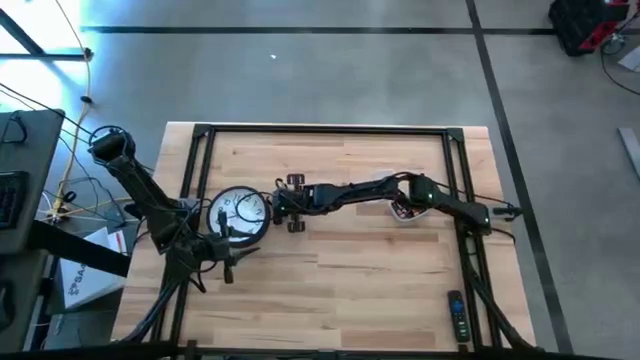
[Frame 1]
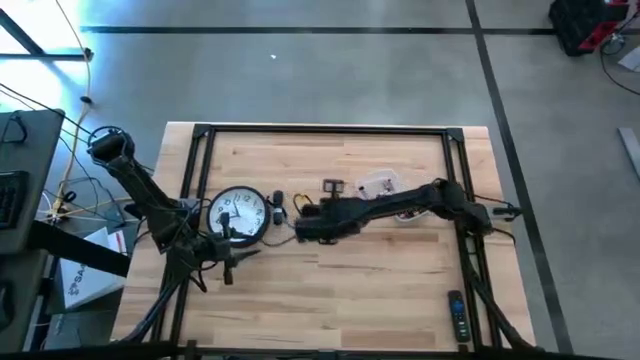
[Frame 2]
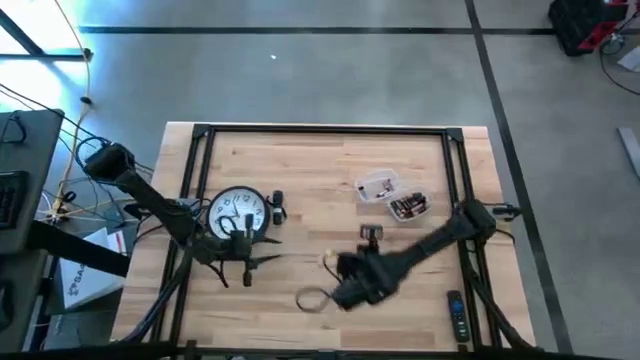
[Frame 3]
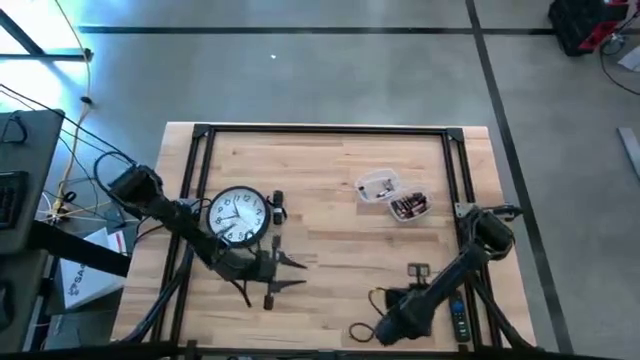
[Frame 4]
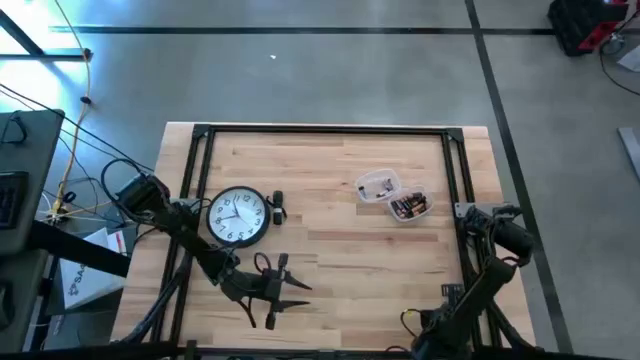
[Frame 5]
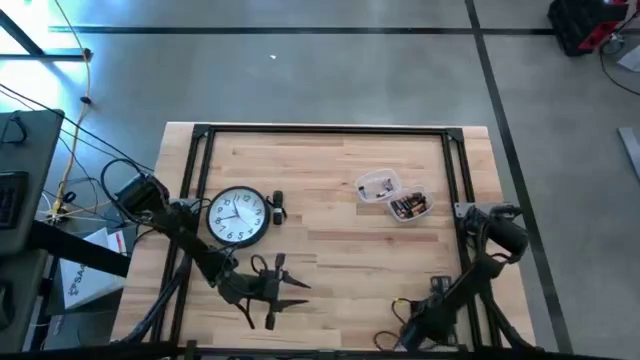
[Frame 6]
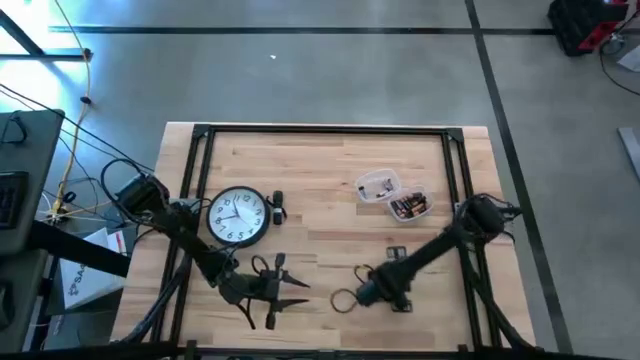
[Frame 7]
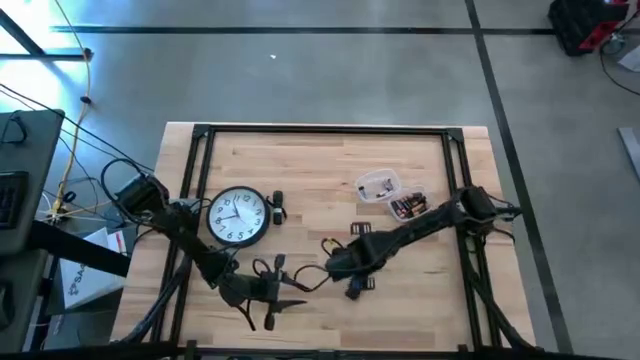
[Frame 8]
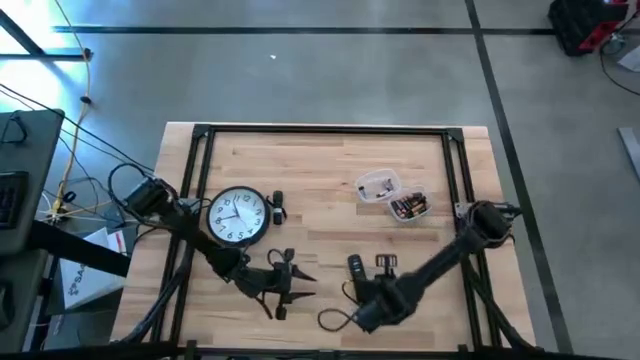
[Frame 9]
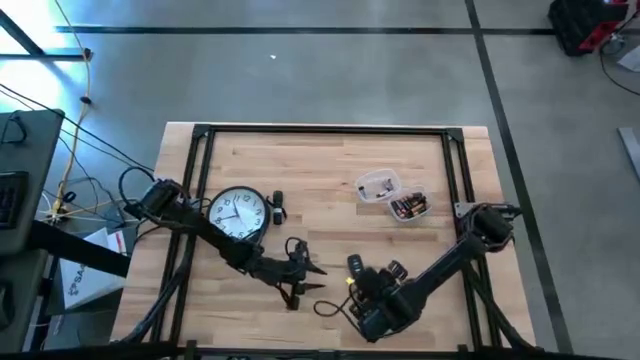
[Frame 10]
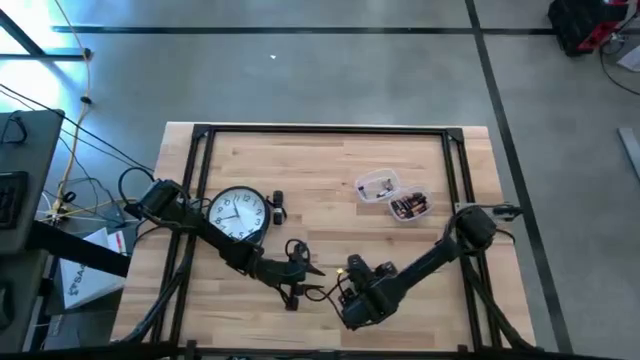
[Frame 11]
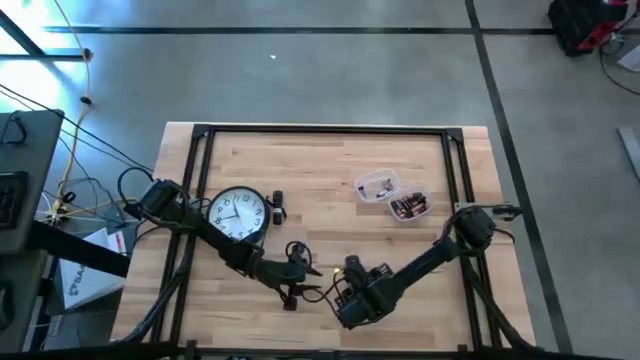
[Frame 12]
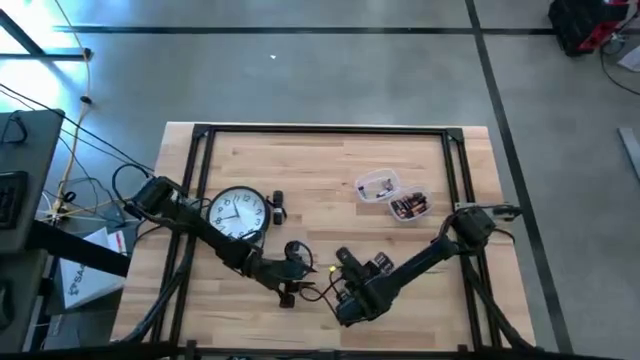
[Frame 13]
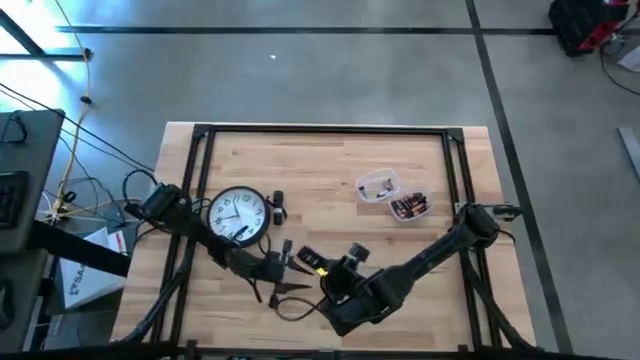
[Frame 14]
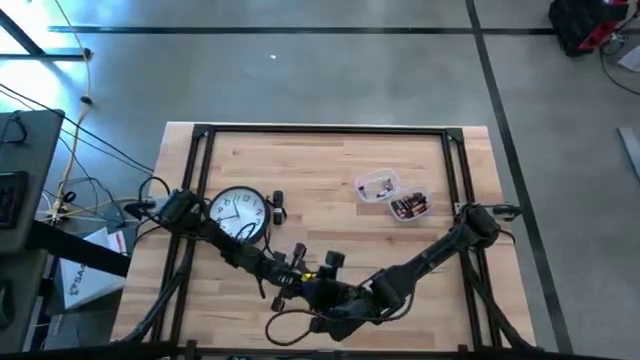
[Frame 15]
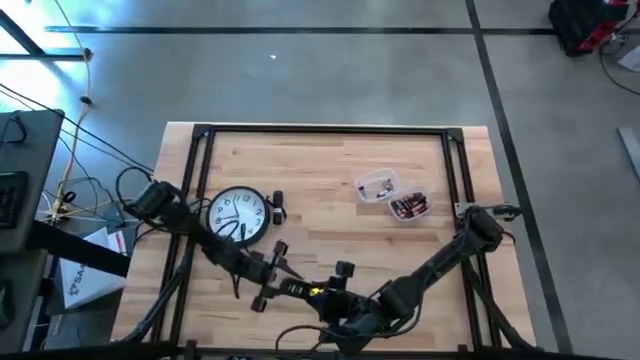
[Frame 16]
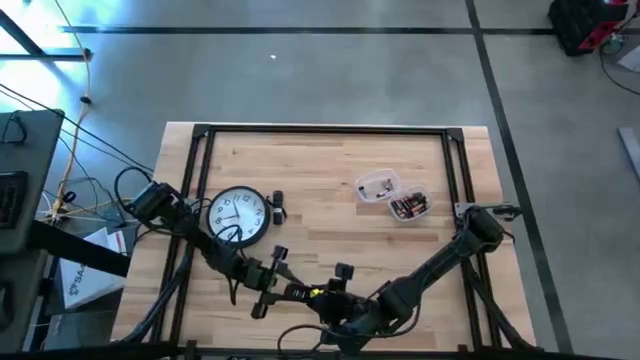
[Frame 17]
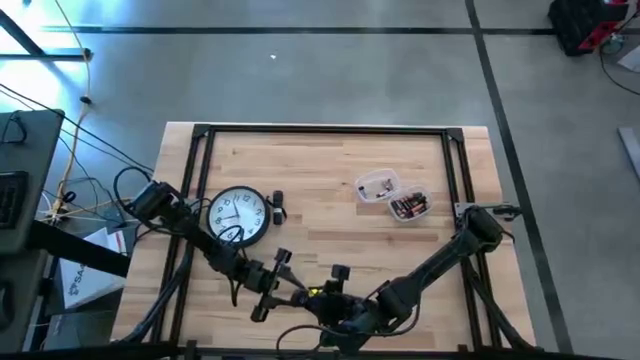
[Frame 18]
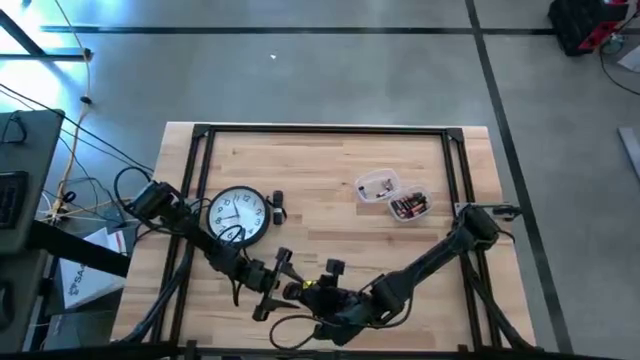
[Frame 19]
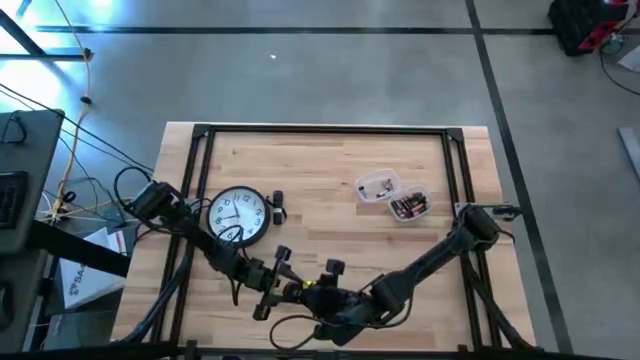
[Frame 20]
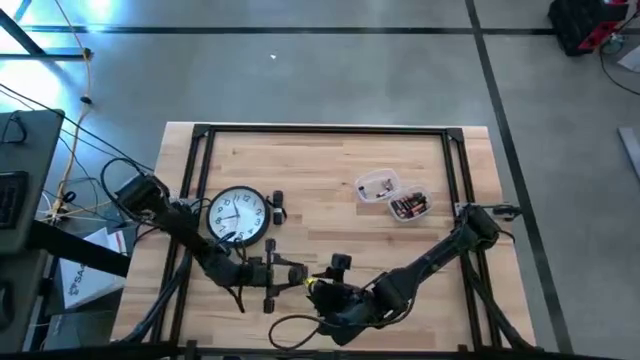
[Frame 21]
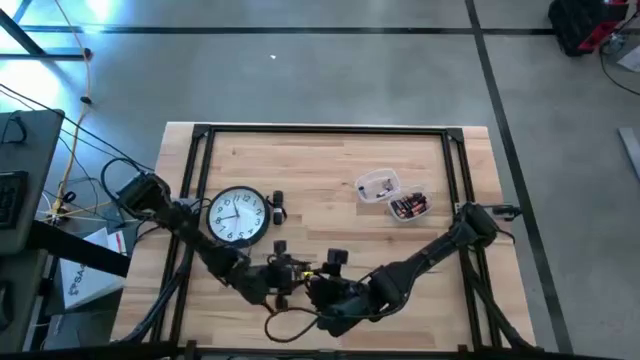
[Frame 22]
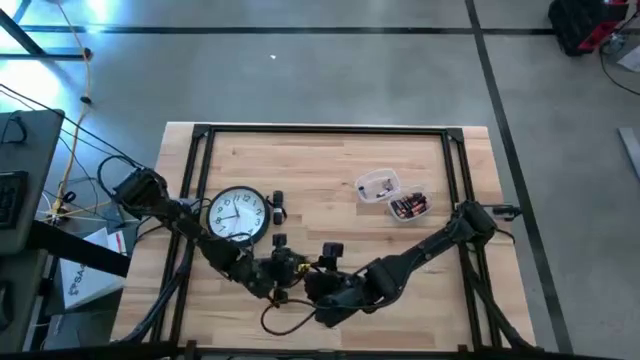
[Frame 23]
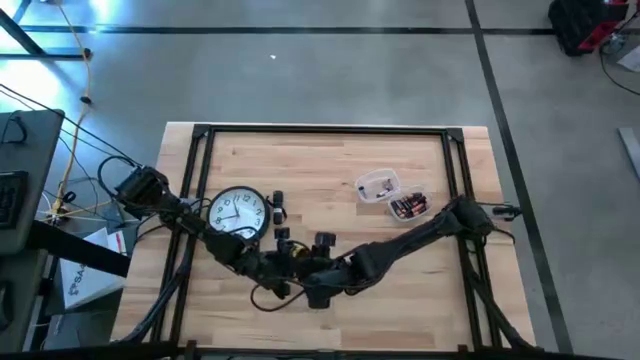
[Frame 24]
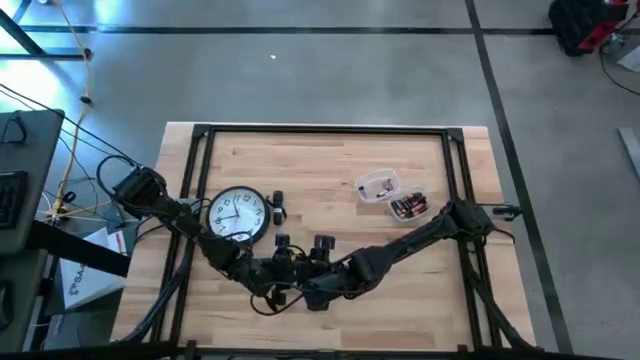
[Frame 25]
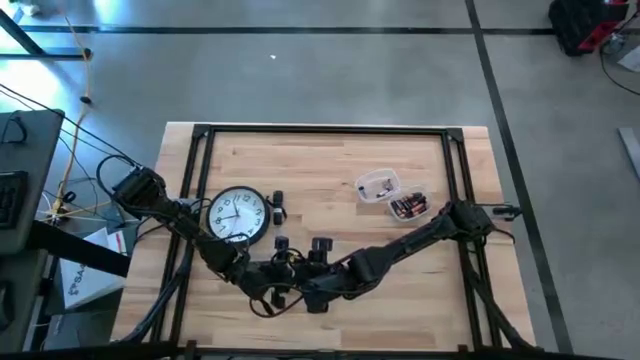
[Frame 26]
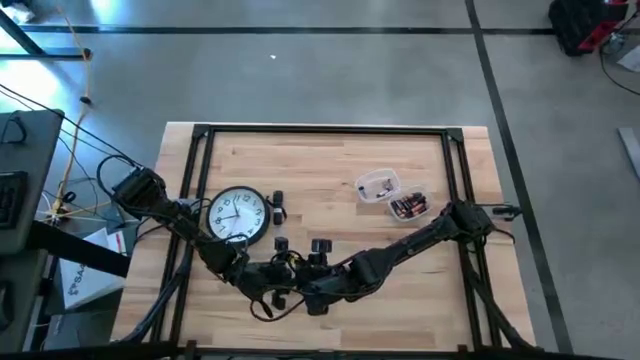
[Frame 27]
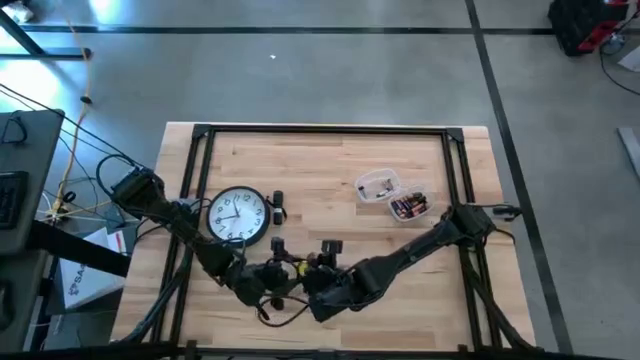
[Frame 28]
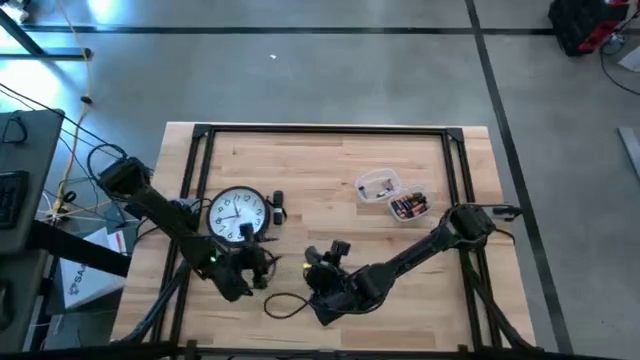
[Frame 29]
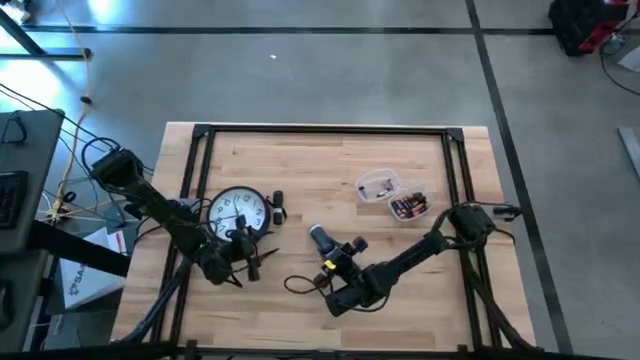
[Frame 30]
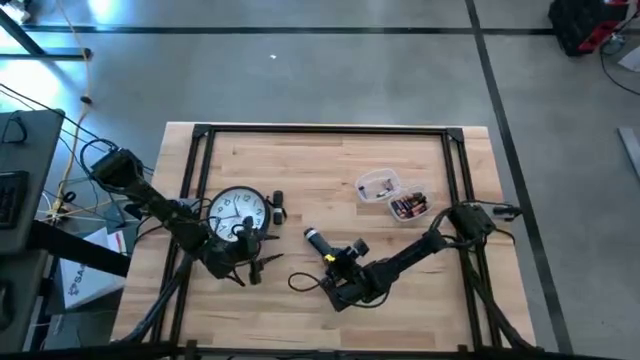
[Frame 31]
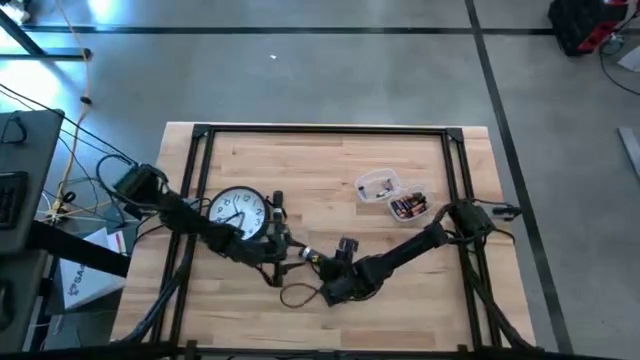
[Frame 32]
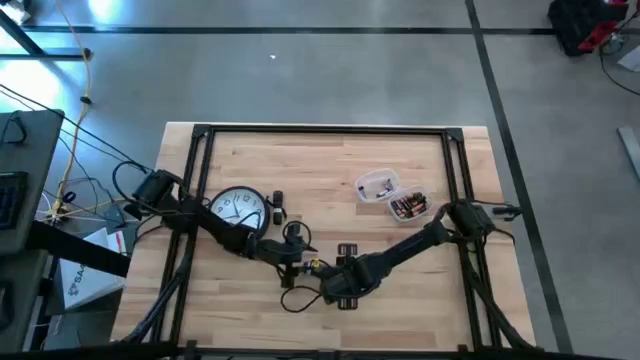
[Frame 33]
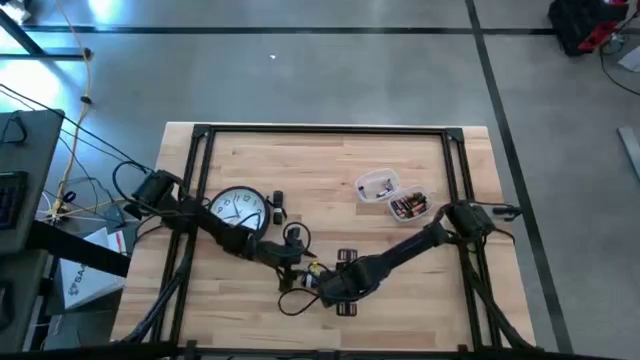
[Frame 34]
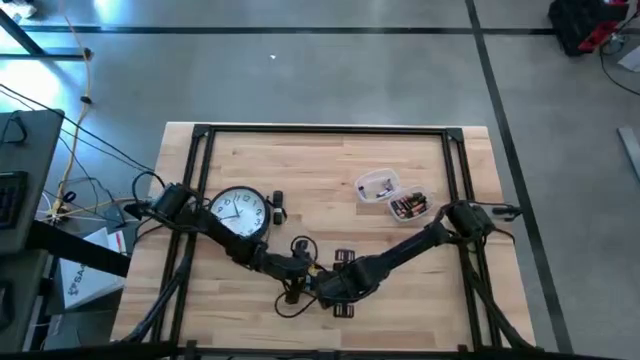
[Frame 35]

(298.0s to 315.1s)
Task: Insert battery
Put the black remote control on the table upside down

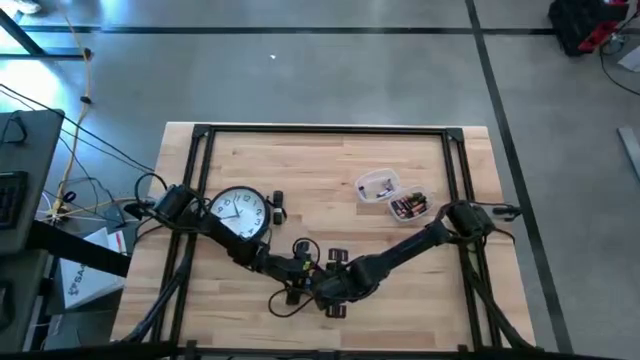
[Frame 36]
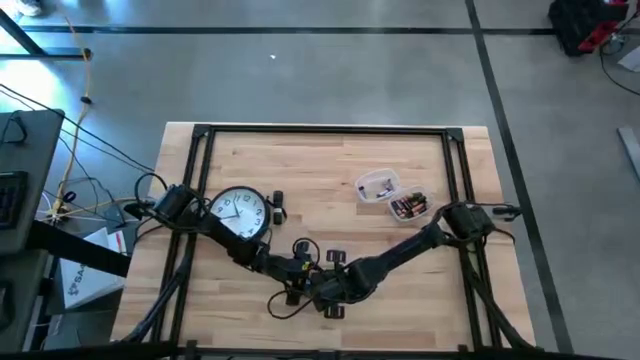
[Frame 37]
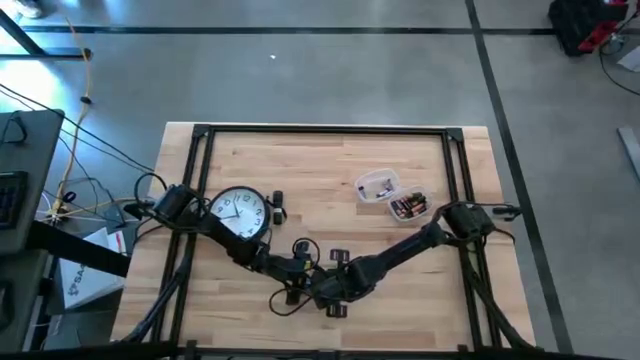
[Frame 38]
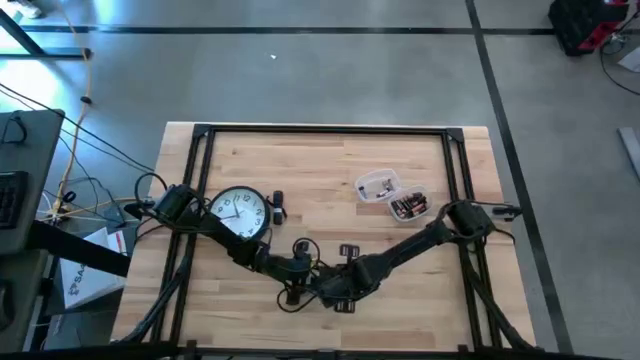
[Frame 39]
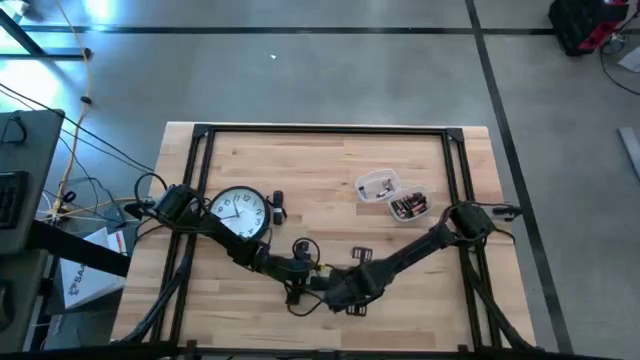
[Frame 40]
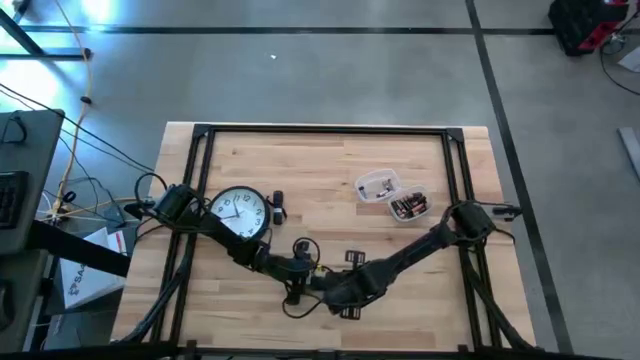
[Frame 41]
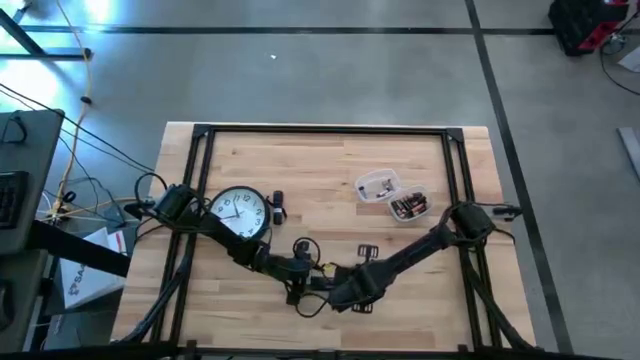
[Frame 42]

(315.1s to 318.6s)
Open the black remote control battery cover
